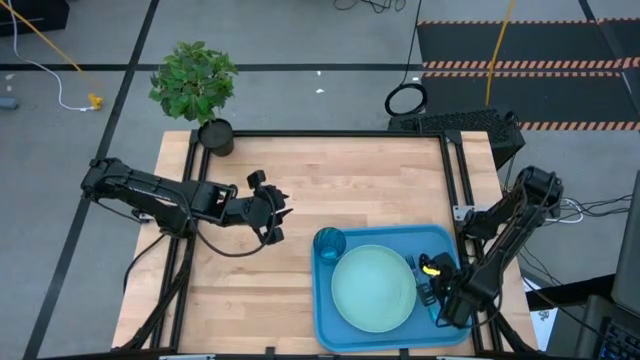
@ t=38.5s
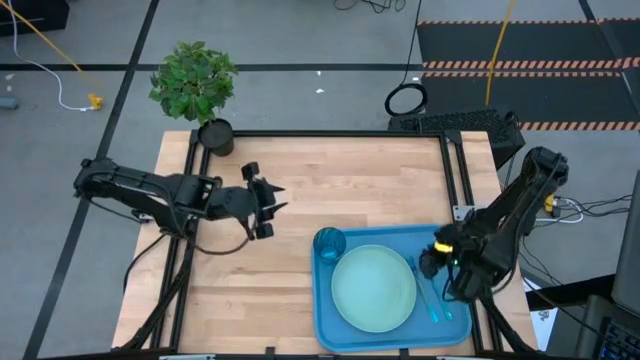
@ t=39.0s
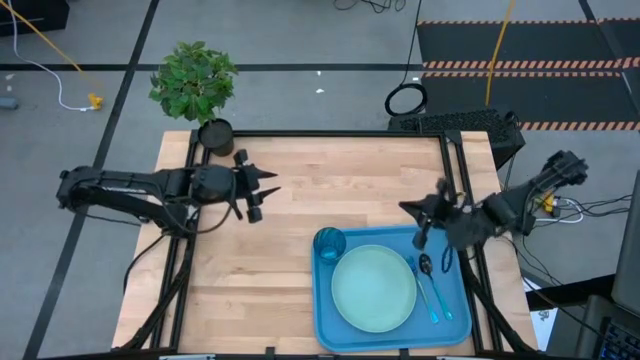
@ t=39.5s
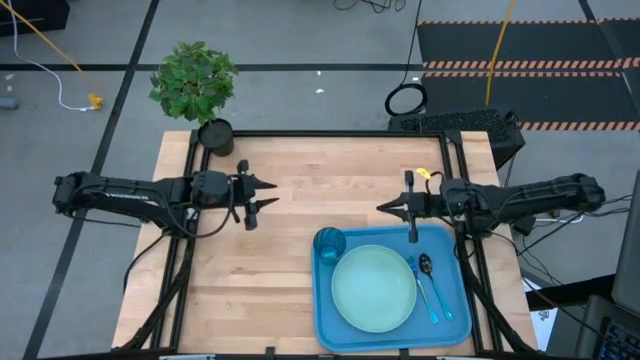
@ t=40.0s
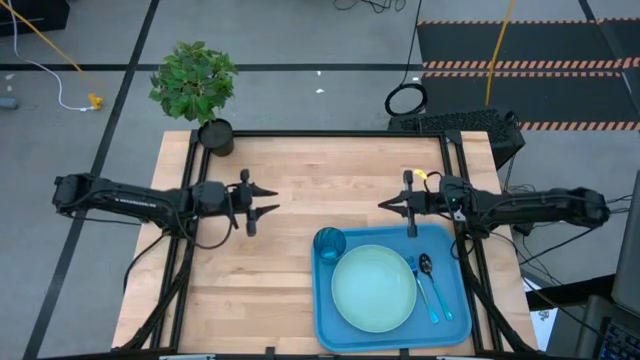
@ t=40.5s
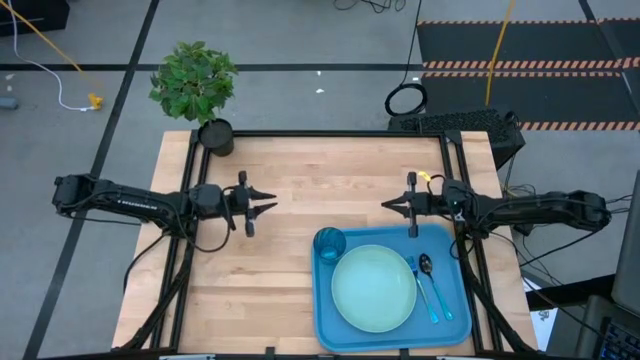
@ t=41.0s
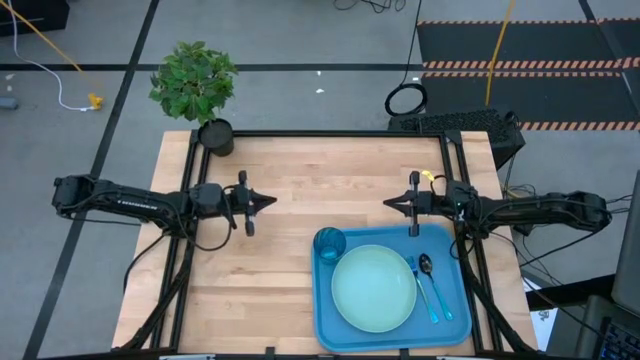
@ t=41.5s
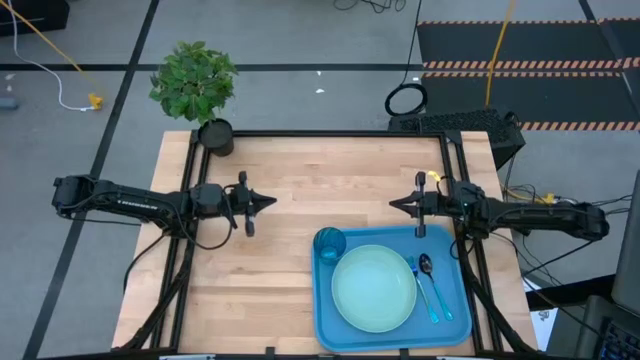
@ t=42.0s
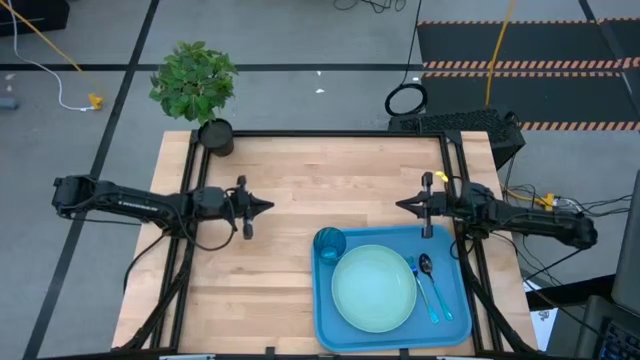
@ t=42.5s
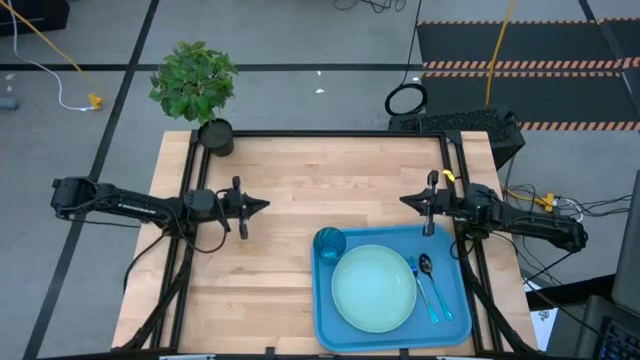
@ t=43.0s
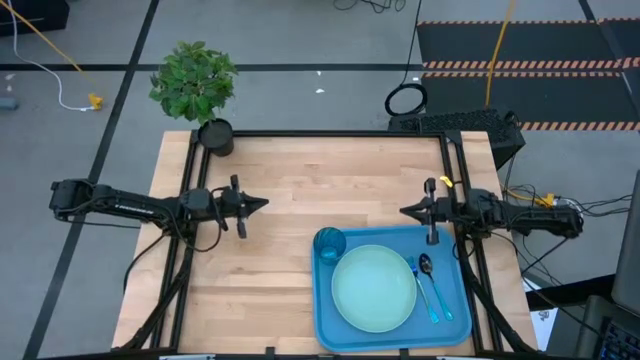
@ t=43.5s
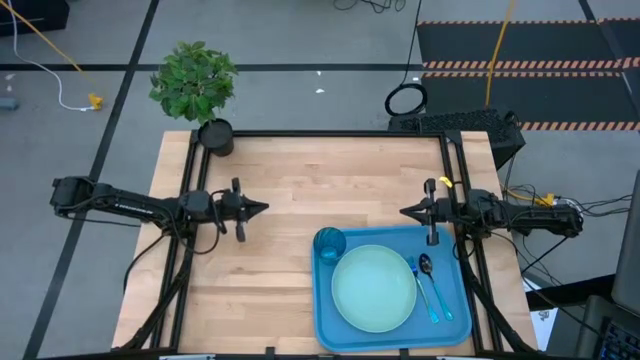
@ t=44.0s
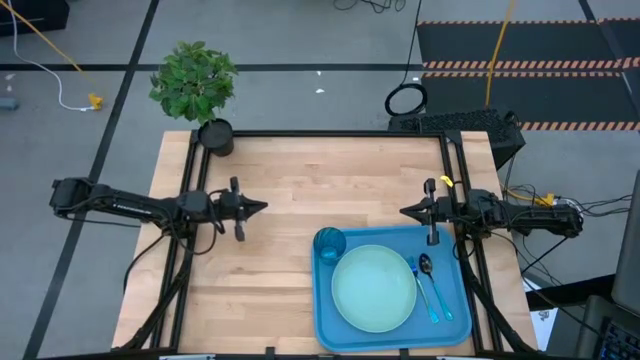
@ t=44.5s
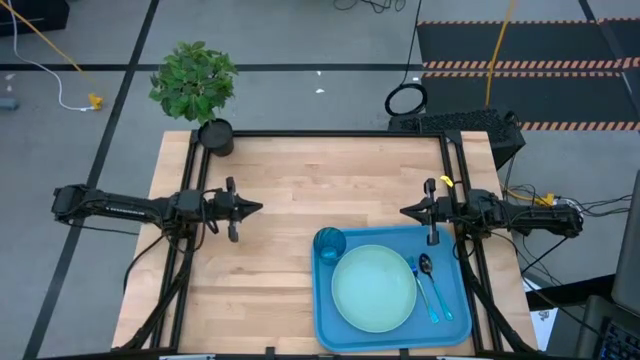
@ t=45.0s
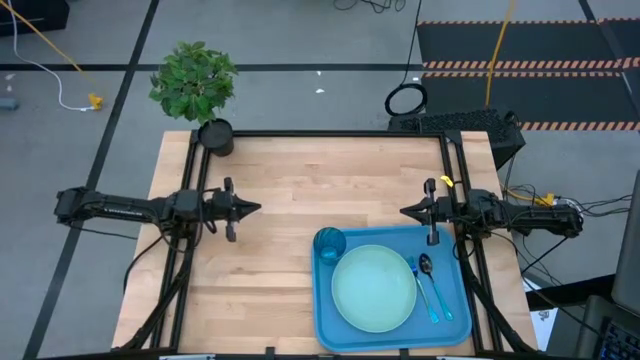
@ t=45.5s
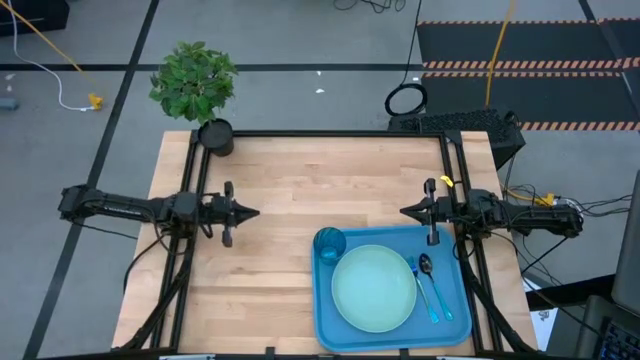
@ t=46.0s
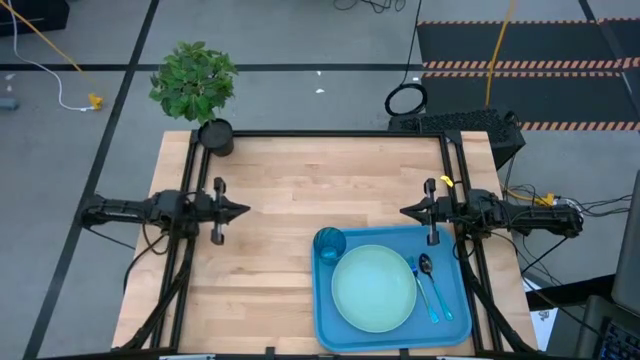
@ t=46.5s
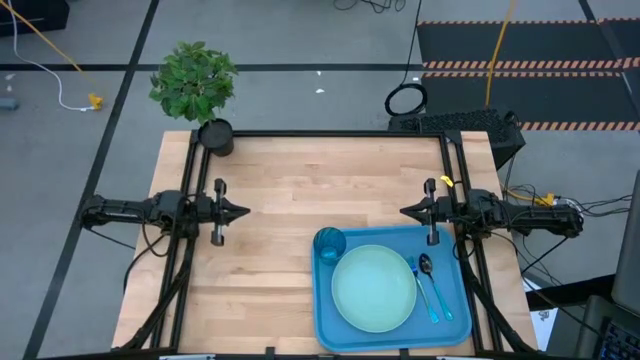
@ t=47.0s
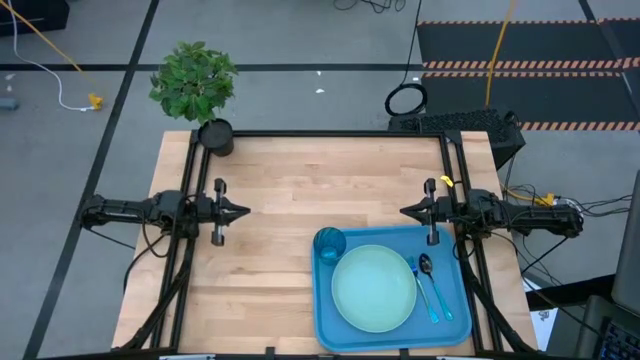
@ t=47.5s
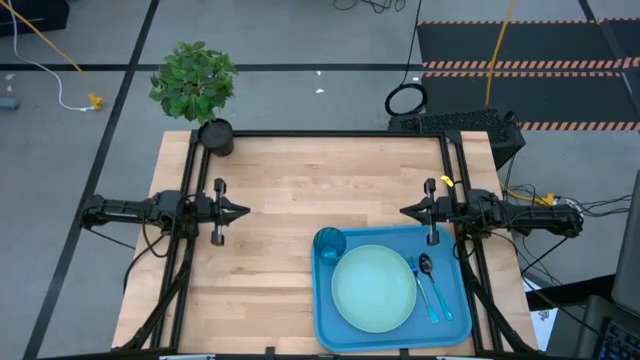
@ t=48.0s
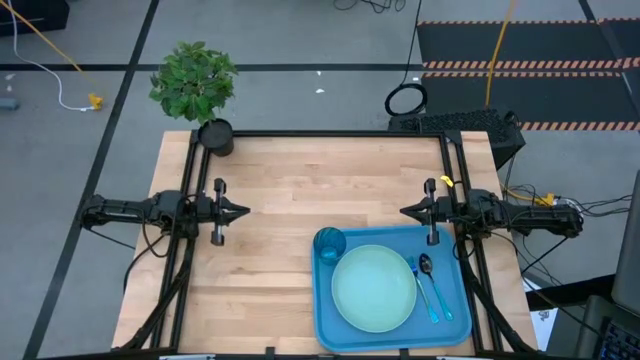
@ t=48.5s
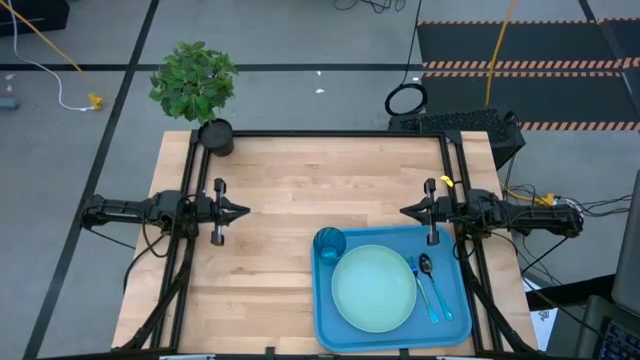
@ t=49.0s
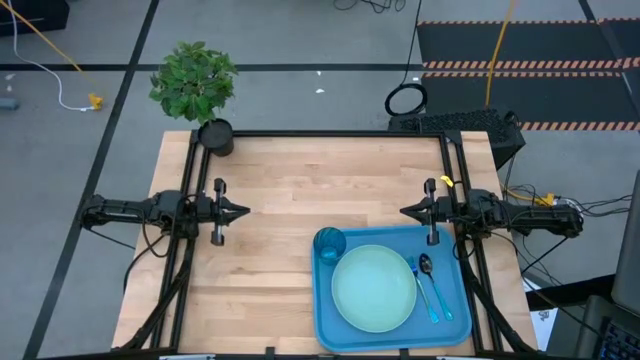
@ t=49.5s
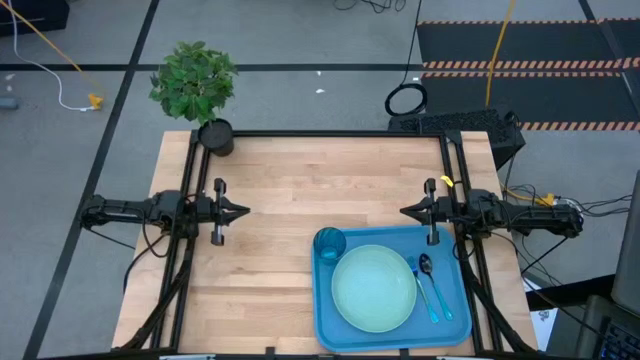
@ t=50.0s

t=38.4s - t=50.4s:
Task: Pick and place plate/cup/fork/spoon on tray
Return to Home Position

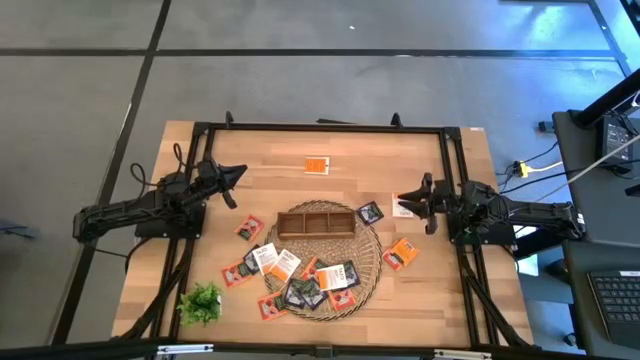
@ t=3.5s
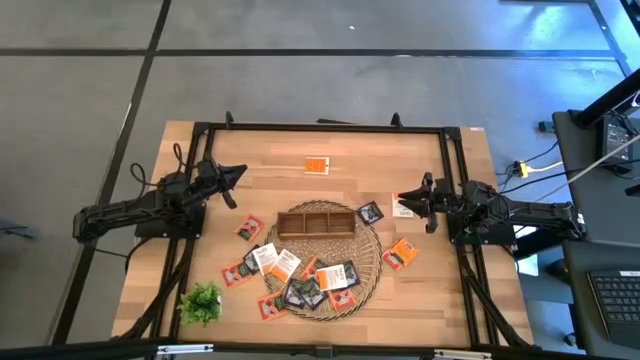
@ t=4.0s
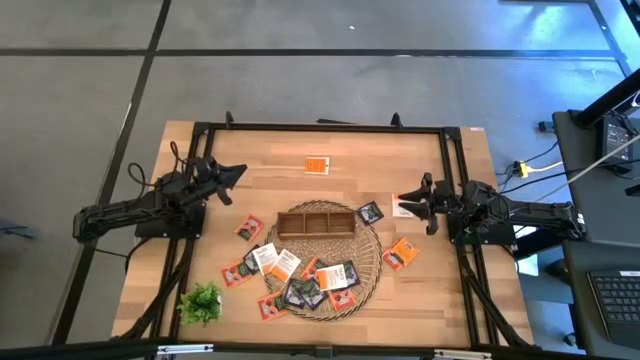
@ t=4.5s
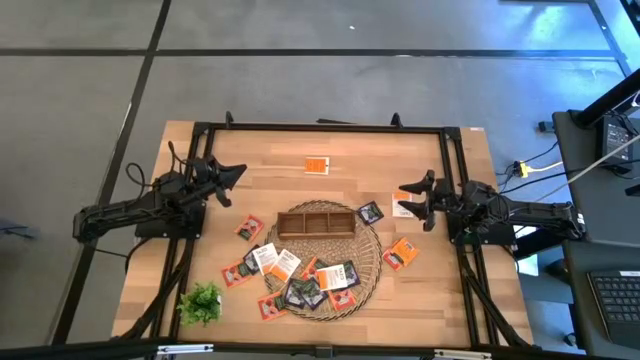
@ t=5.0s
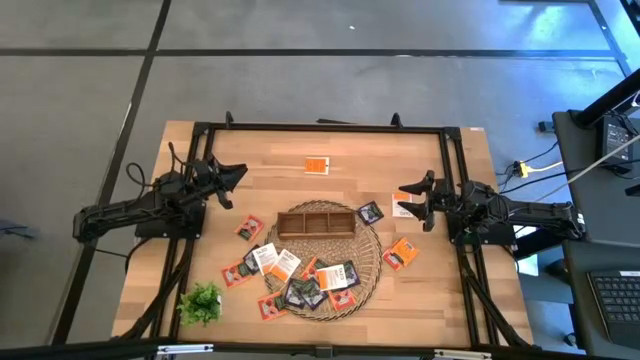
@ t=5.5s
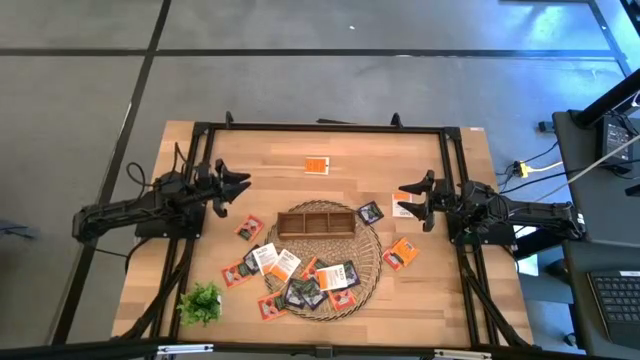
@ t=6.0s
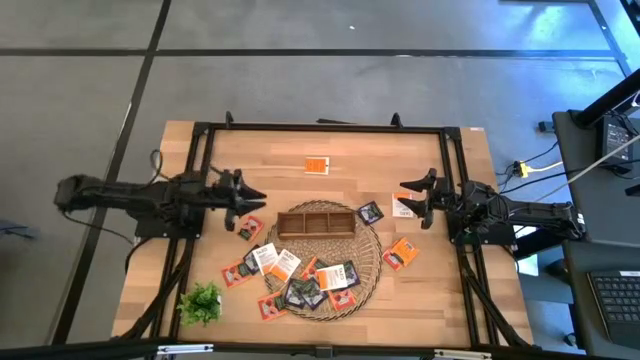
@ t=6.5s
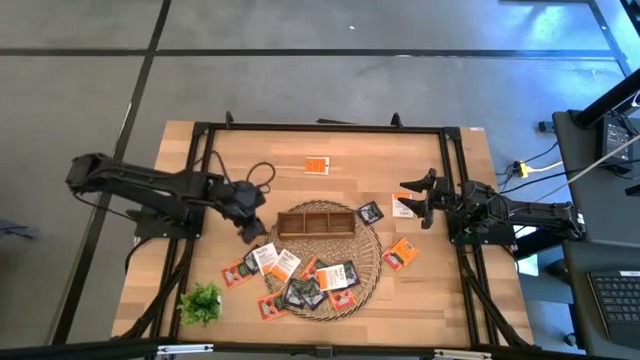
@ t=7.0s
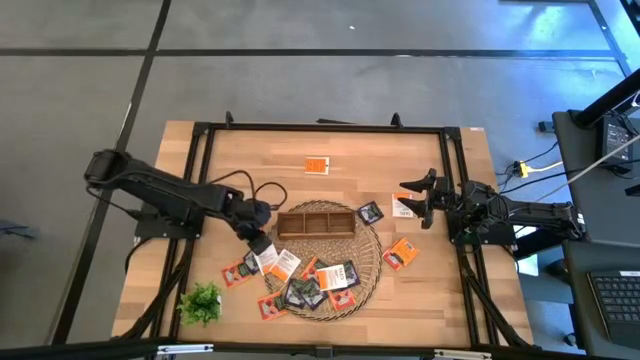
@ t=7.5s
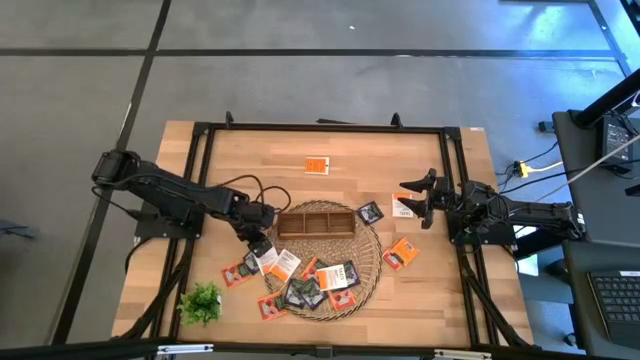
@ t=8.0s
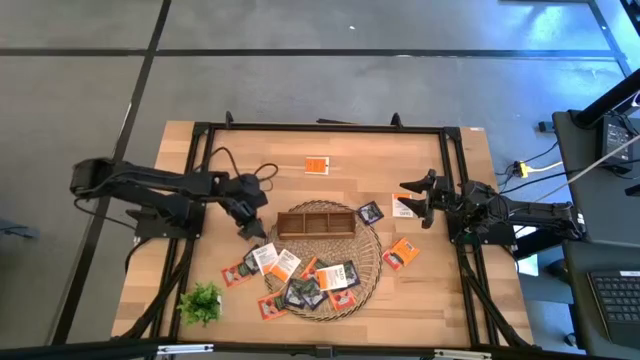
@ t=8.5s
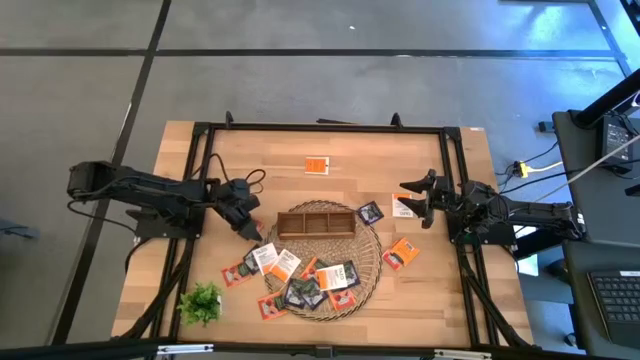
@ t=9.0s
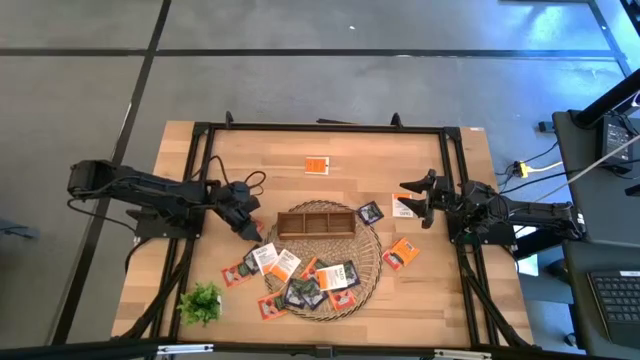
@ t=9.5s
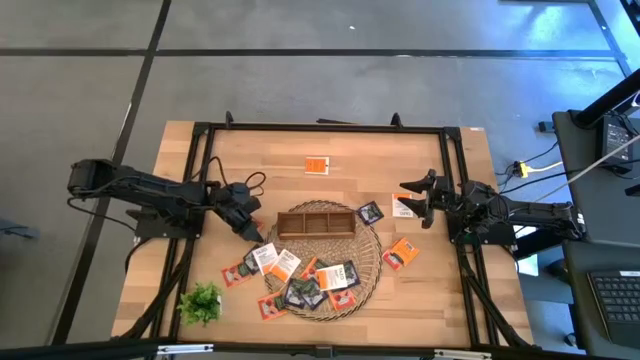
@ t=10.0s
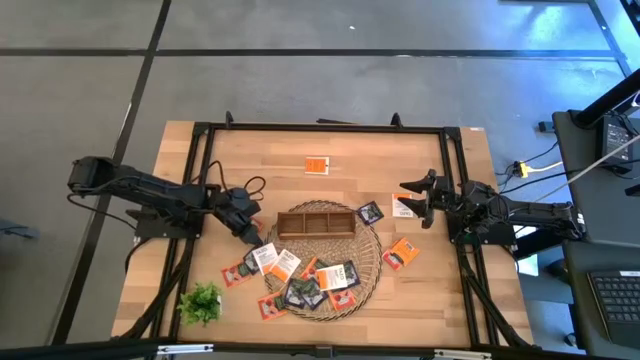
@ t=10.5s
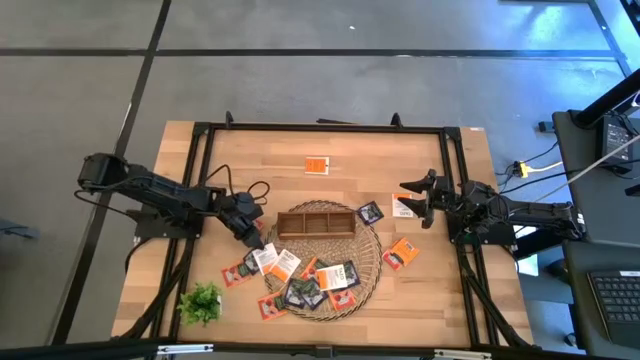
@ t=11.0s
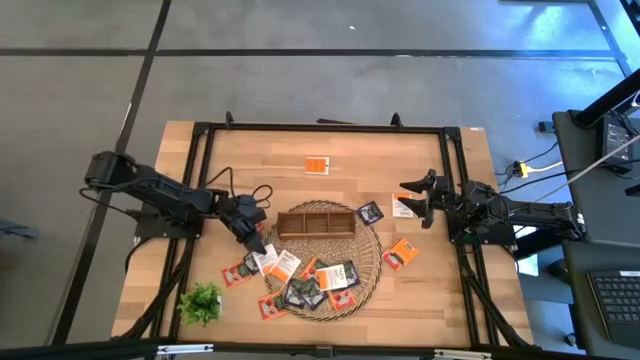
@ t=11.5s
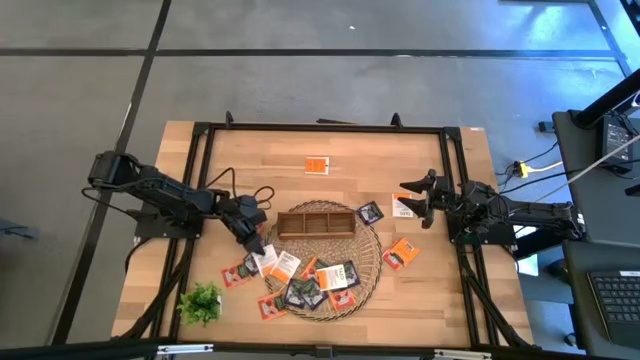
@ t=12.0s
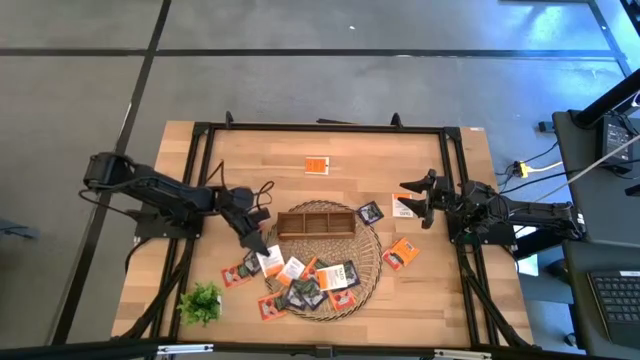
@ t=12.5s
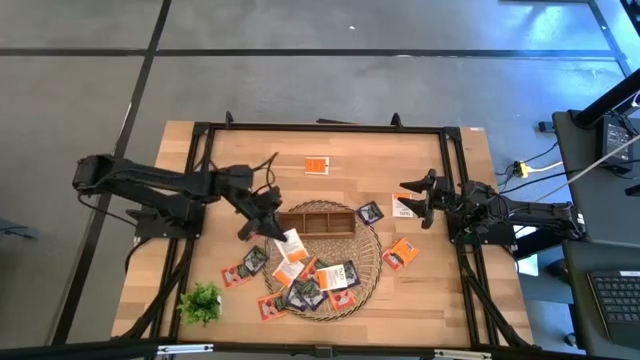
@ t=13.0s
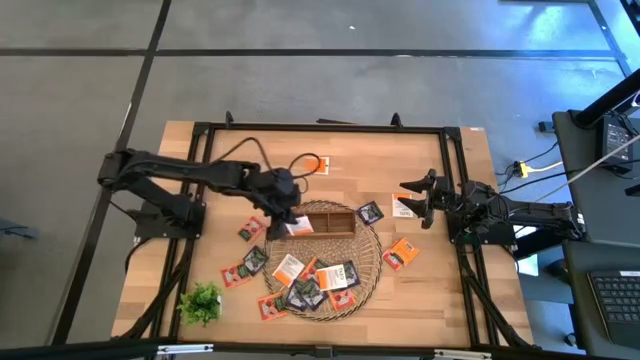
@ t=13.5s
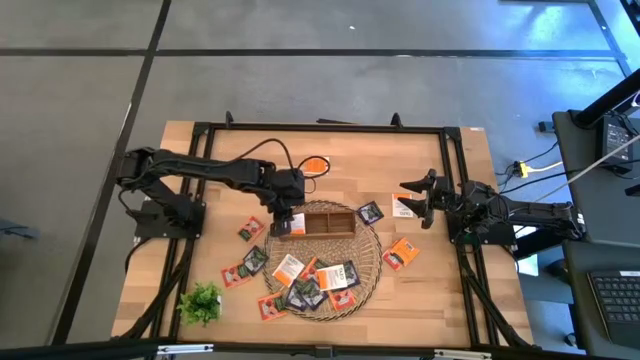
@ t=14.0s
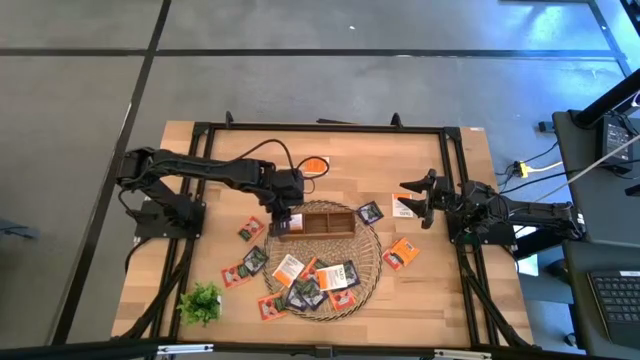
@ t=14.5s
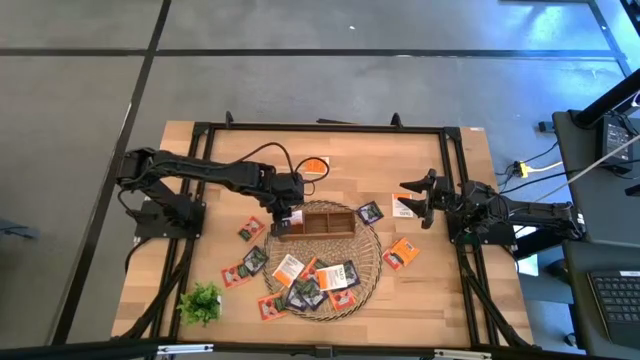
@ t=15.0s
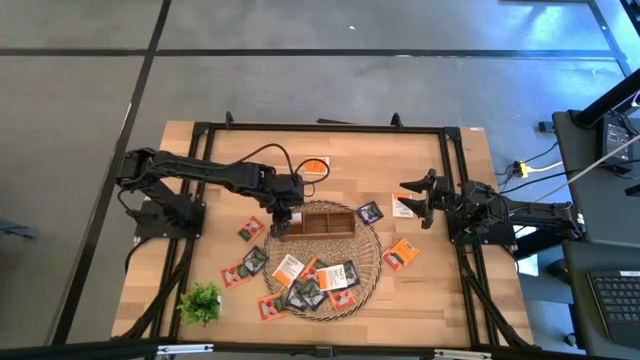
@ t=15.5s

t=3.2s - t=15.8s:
Task: Pick & Place Tea
Put the white tea bag into the left slot of the wooden organizer
